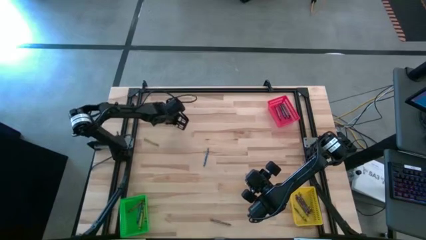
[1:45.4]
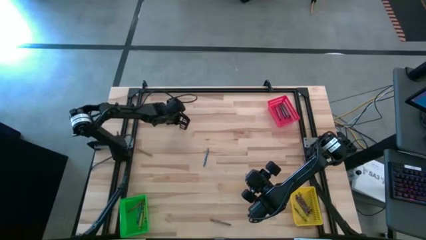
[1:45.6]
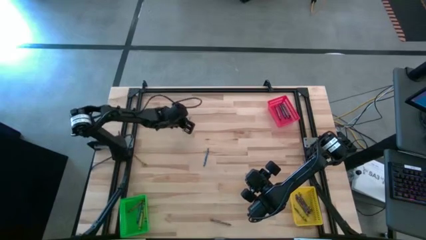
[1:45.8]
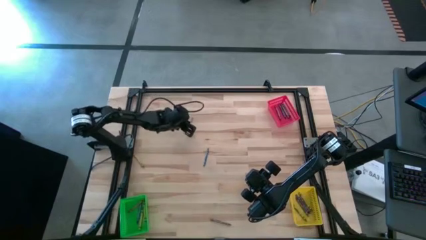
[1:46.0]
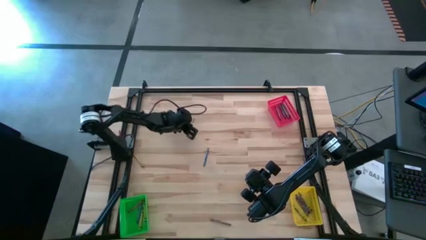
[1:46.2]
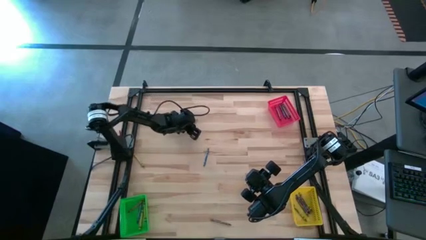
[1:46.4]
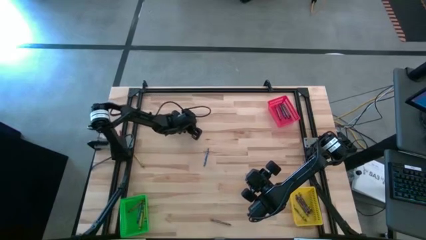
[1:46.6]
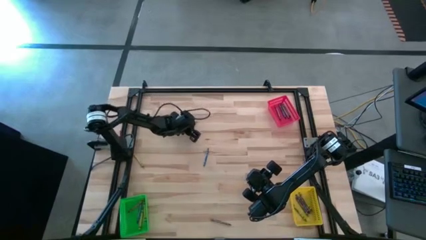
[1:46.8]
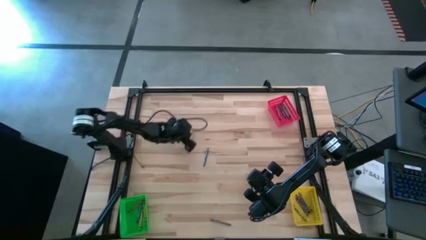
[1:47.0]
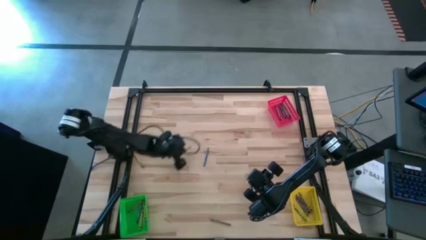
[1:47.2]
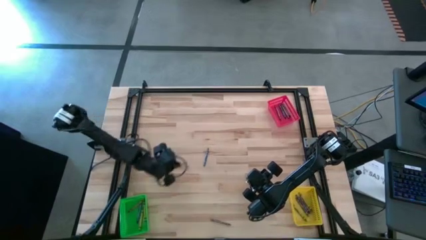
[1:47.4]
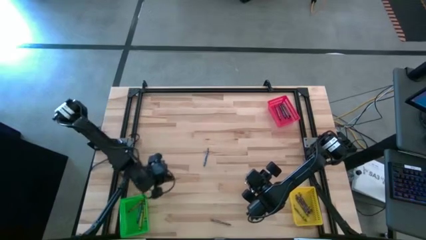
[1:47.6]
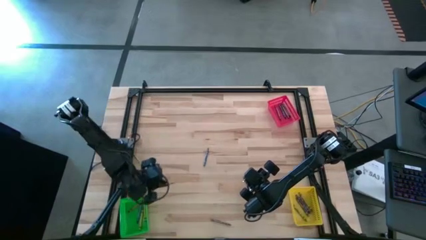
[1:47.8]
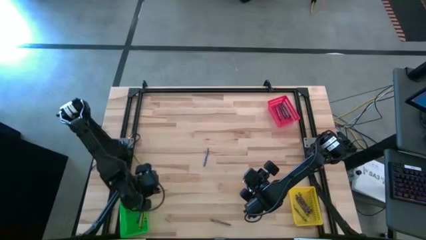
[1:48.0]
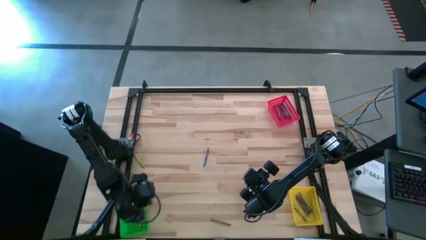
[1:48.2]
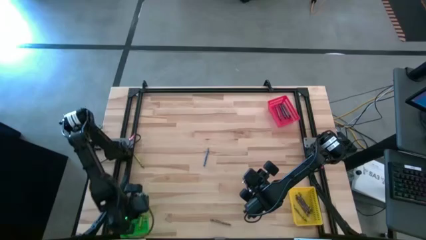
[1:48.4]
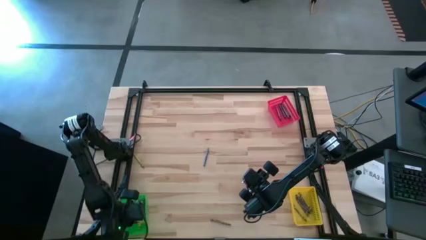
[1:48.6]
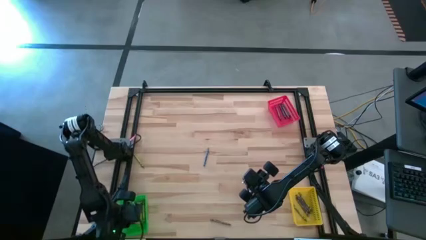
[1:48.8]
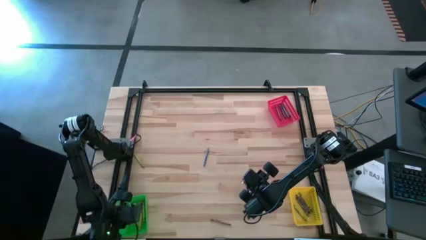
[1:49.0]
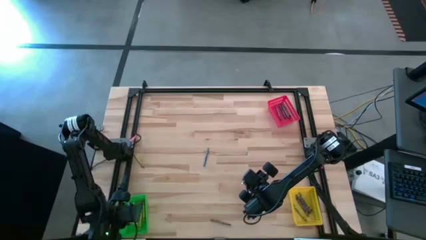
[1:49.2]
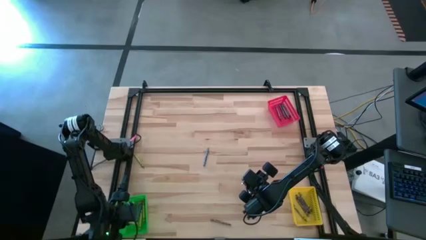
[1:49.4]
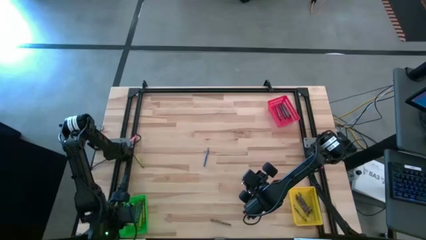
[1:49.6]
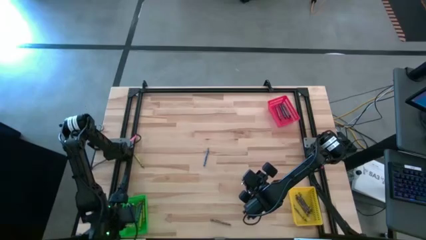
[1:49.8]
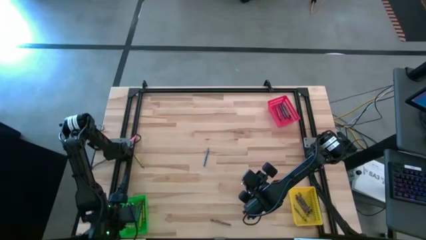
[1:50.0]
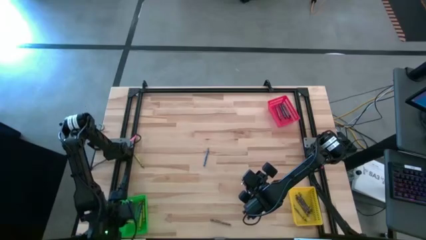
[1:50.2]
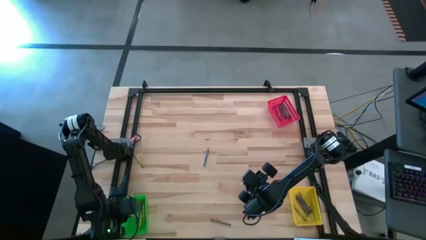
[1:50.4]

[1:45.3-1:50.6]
Task: Sort crayons
Put the green crayon into the green bin

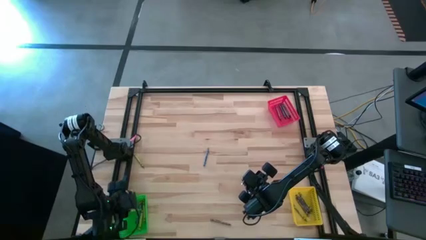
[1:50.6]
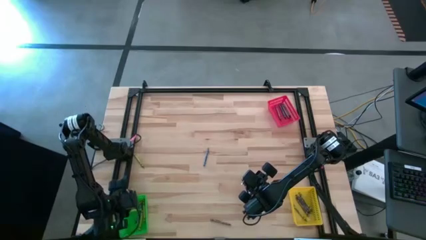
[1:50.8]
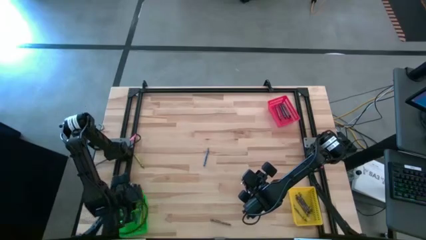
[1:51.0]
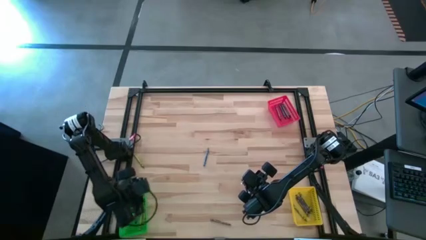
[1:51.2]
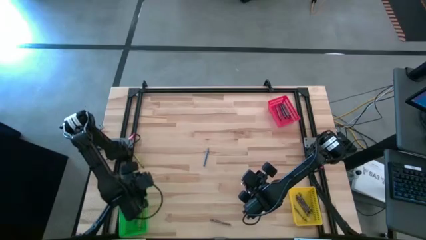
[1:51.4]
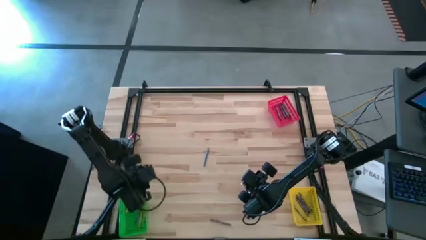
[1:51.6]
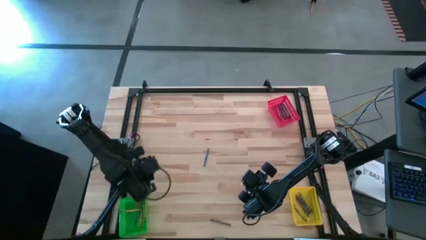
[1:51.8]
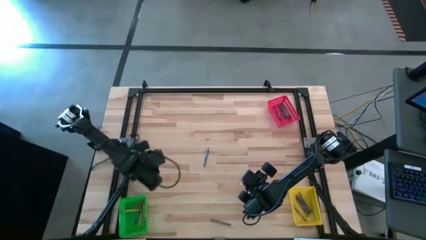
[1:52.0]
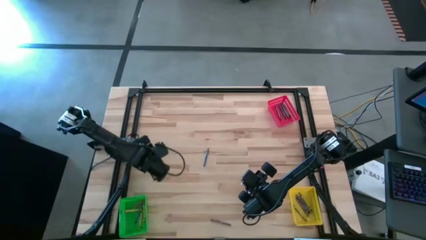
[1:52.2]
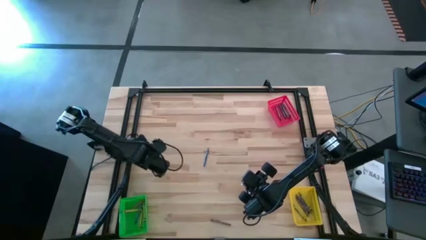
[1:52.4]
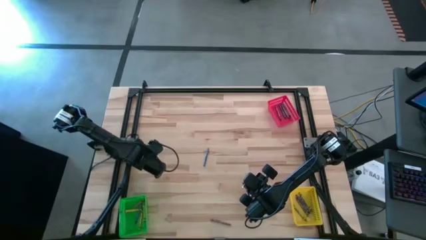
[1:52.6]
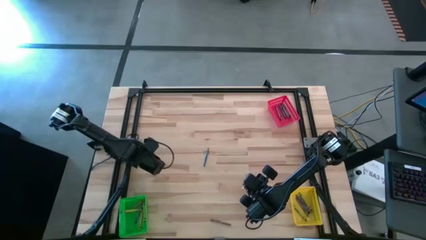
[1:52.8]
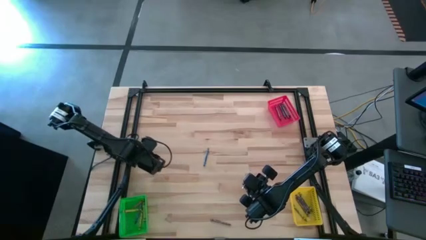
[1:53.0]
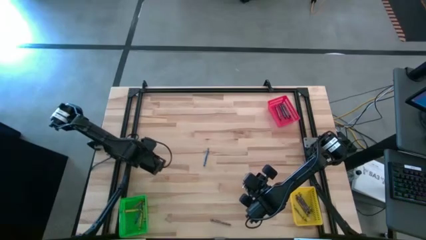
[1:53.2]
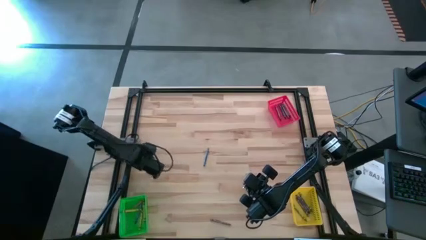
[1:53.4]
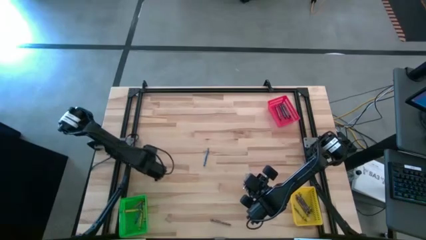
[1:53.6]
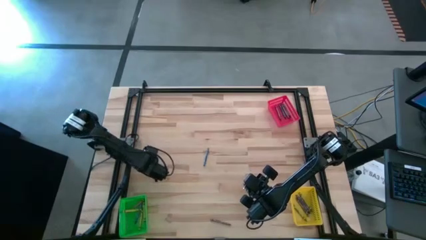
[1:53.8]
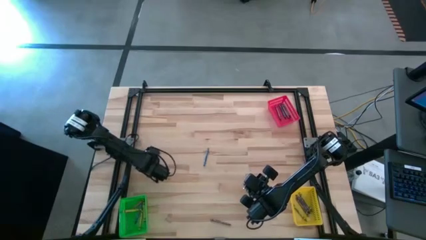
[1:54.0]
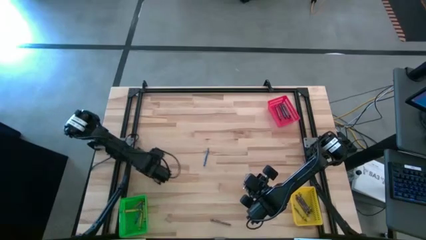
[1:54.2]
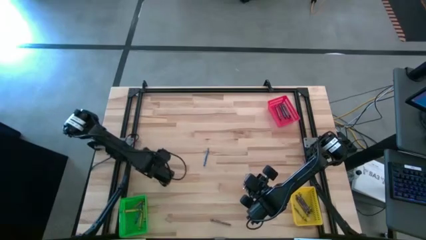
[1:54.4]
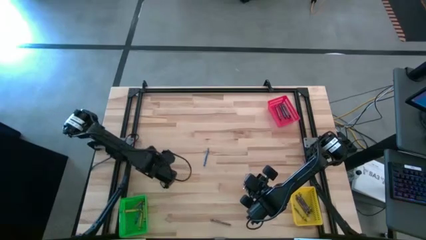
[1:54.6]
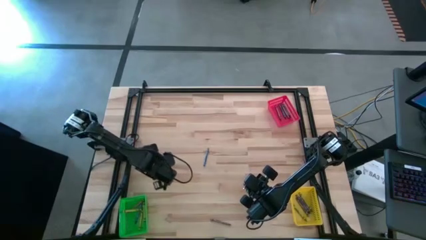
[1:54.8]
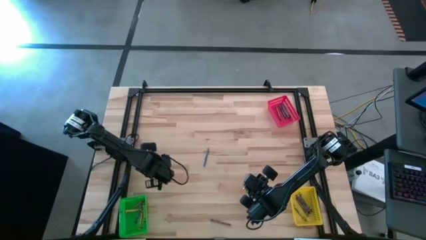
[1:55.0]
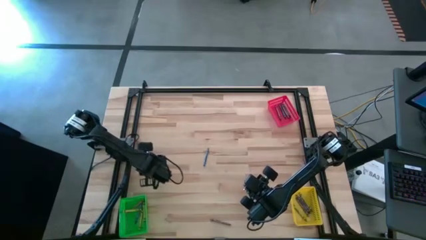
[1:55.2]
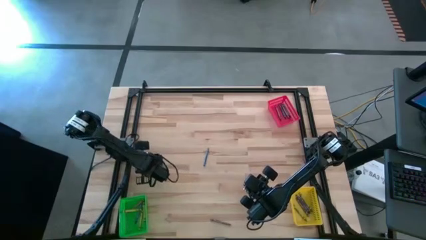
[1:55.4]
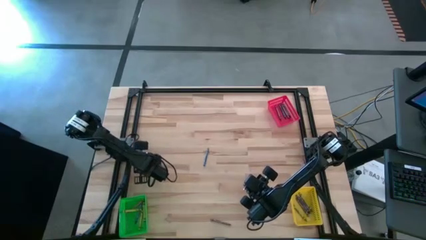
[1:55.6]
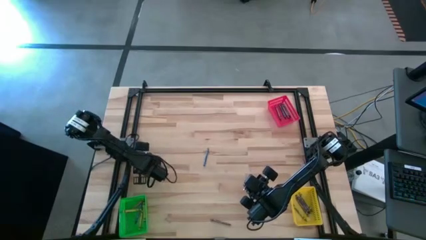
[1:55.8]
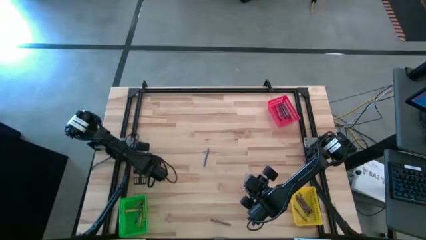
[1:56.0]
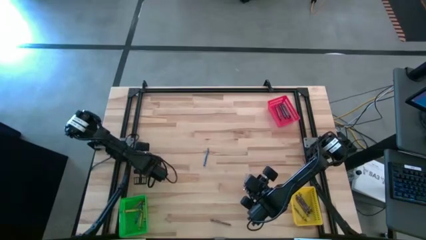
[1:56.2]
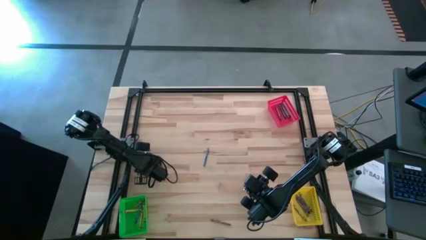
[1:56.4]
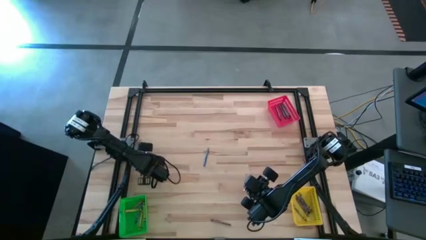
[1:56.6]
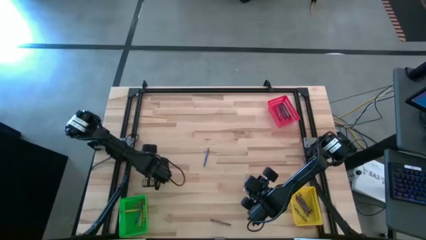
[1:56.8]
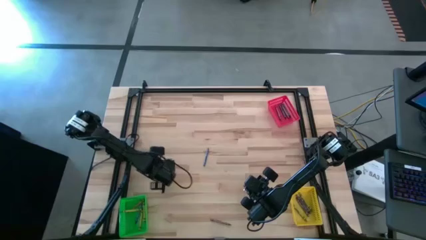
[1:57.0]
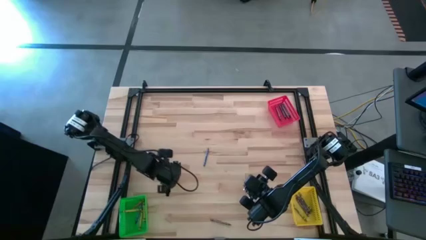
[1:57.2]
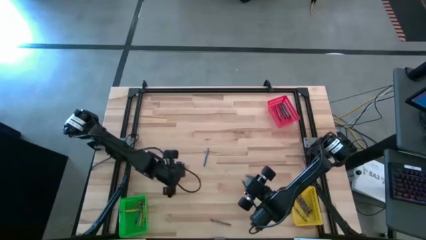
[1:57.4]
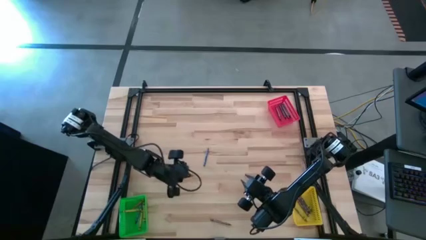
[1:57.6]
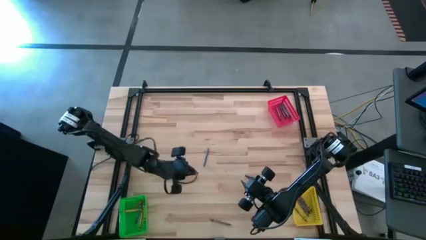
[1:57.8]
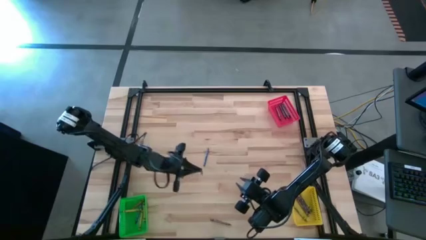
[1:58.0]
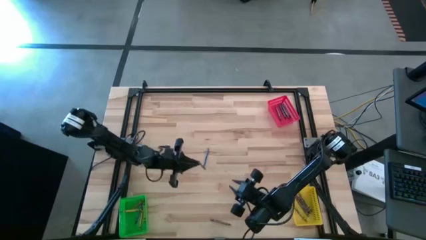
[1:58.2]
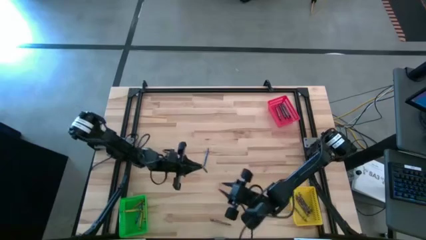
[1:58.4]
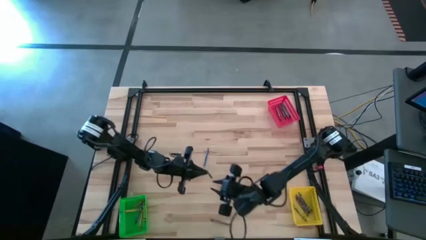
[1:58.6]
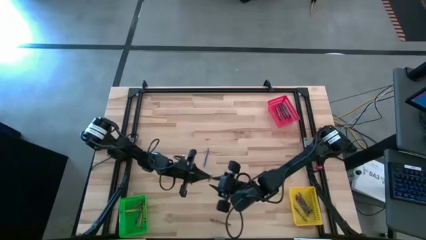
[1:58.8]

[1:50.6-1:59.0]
Put the green crayon into the green bin

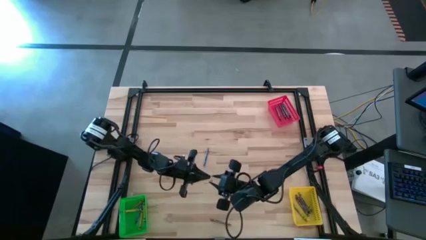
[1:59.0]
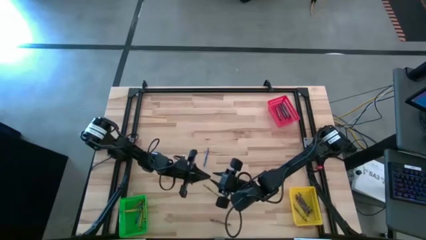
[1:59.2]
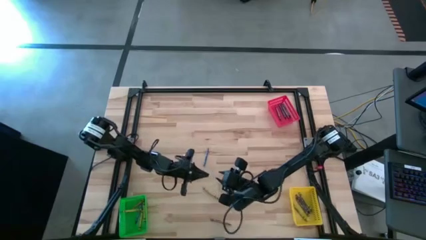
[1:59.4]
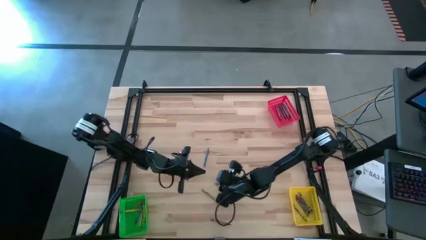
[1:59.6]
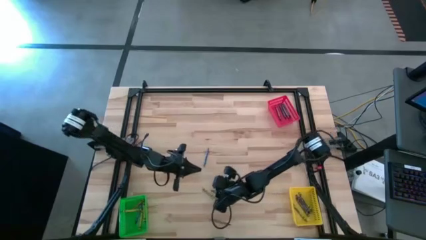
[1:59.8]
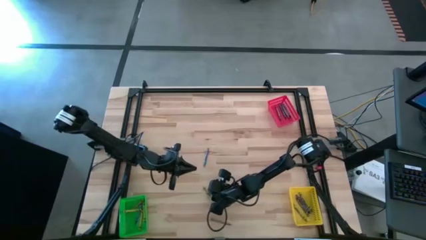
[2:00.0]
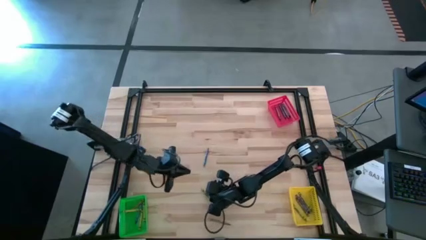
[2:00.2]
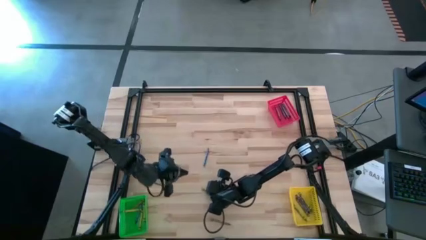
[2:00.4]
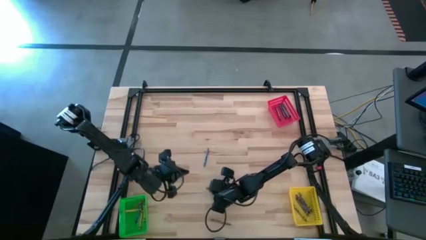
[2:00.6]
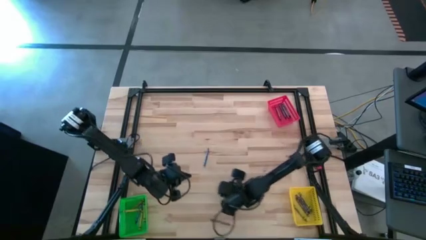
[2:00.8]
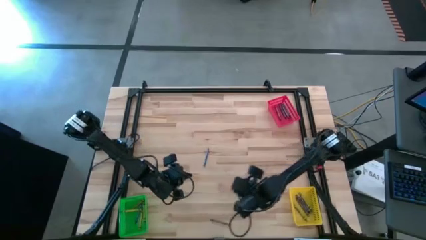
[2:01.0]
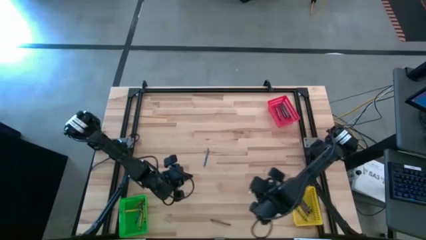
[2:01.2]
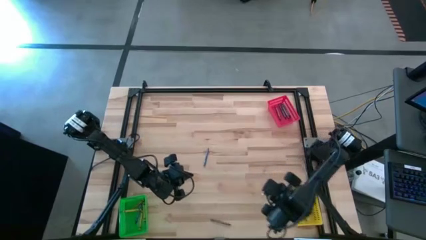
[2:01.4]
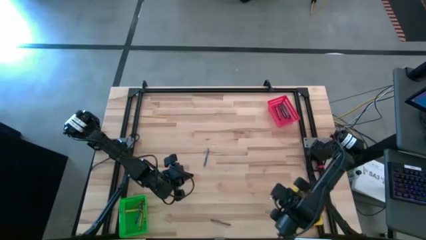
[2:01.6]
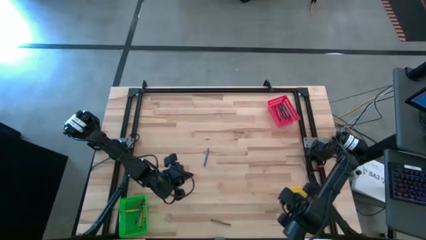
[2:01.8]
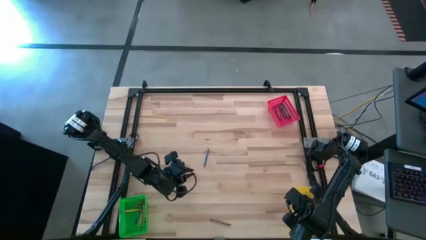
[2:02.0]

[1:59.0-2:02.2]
Put the green crayon into the green bin
